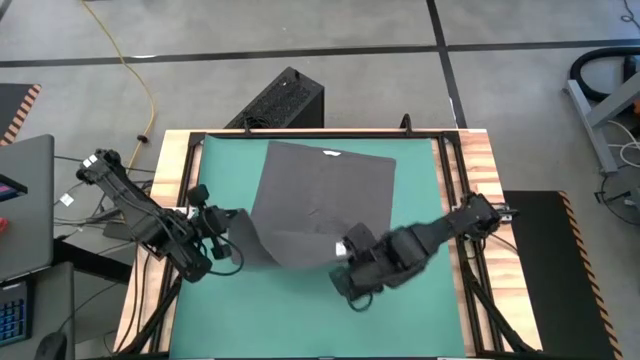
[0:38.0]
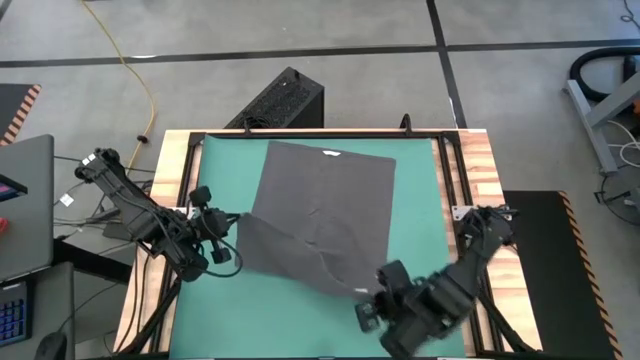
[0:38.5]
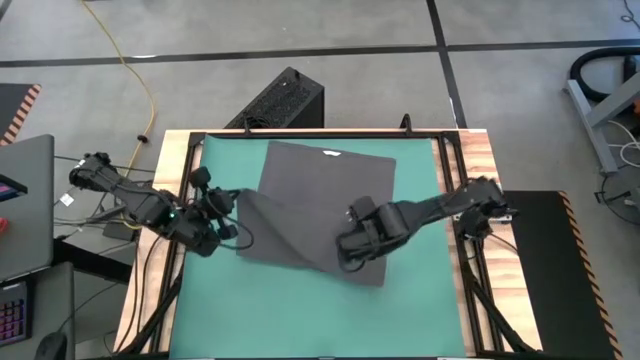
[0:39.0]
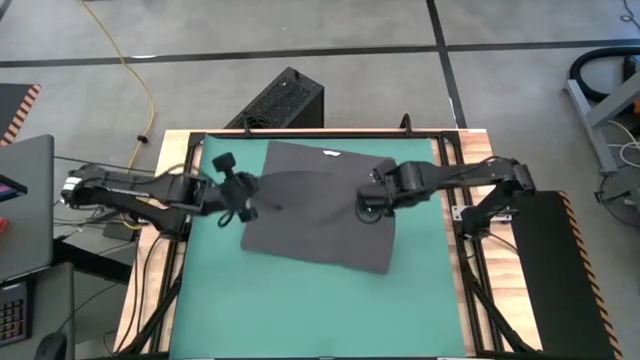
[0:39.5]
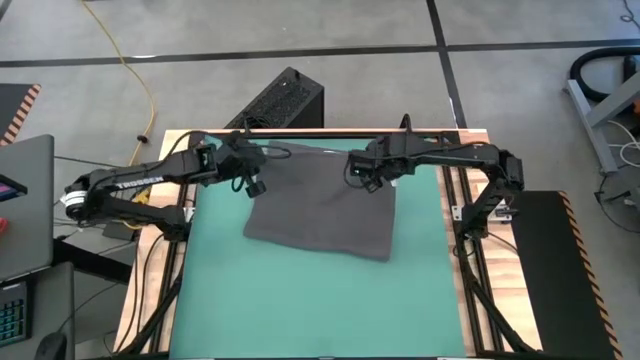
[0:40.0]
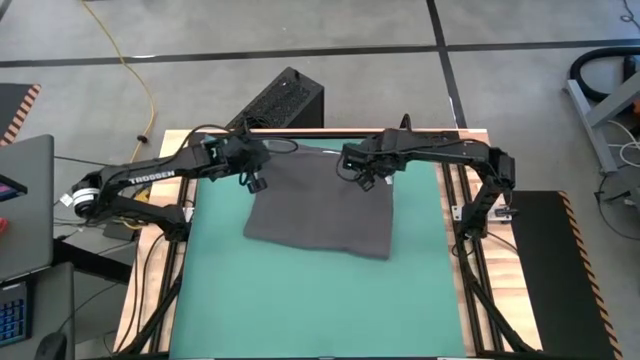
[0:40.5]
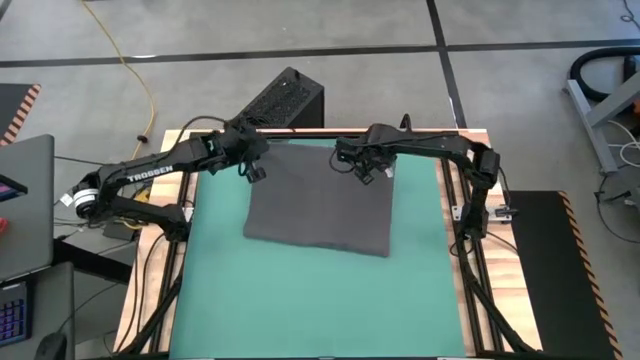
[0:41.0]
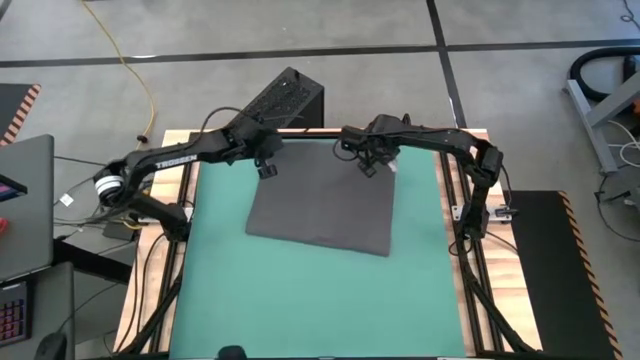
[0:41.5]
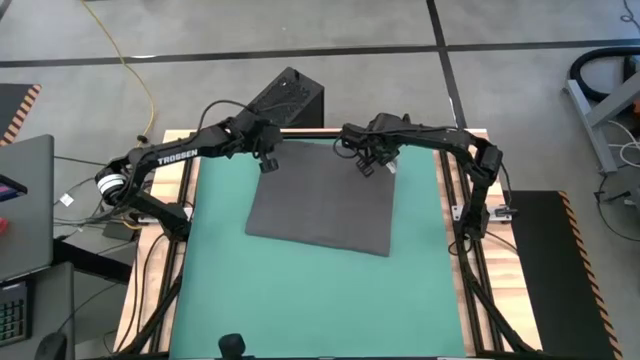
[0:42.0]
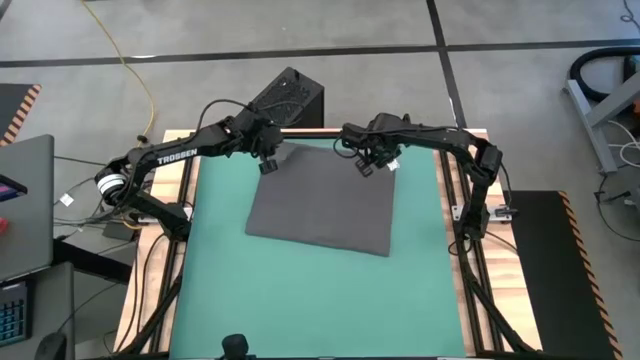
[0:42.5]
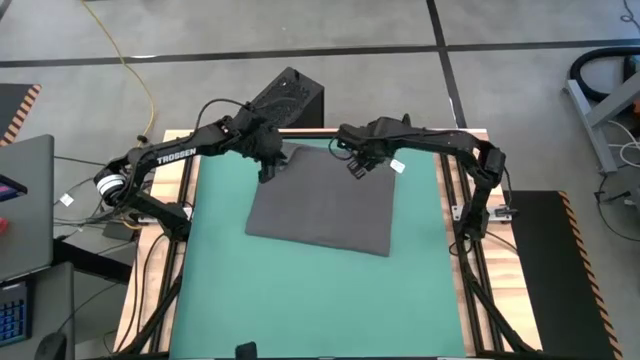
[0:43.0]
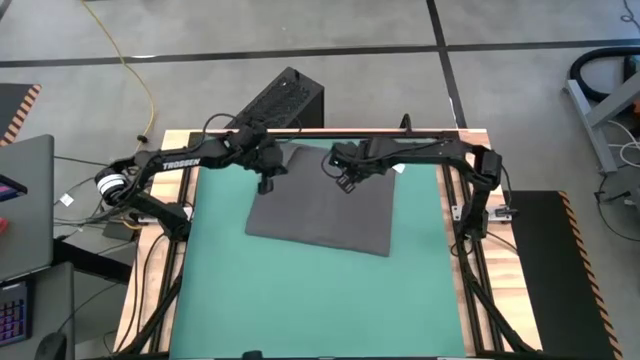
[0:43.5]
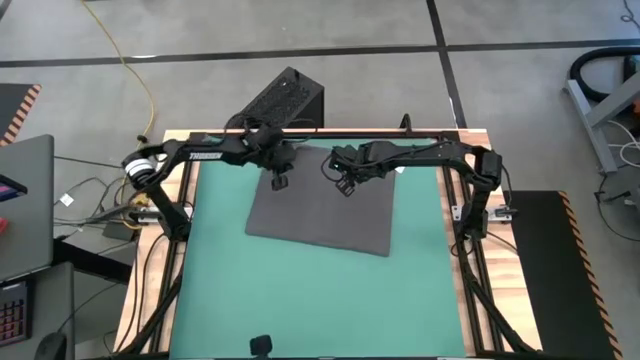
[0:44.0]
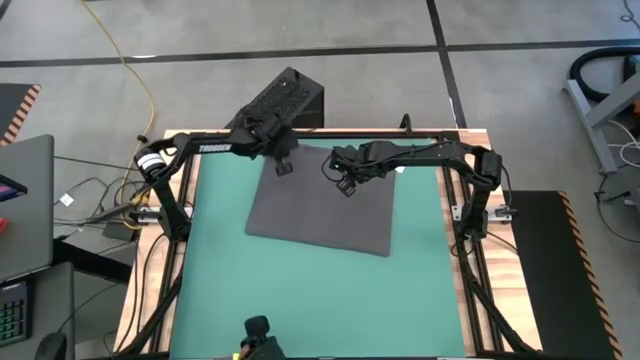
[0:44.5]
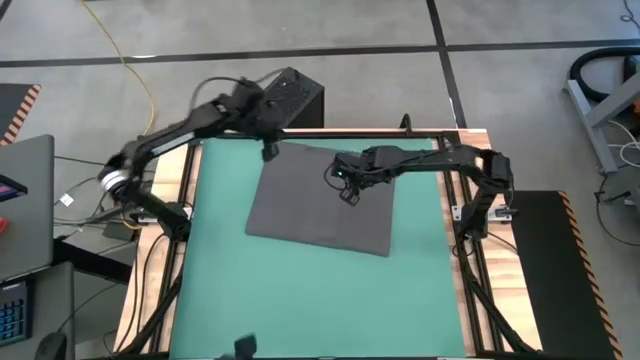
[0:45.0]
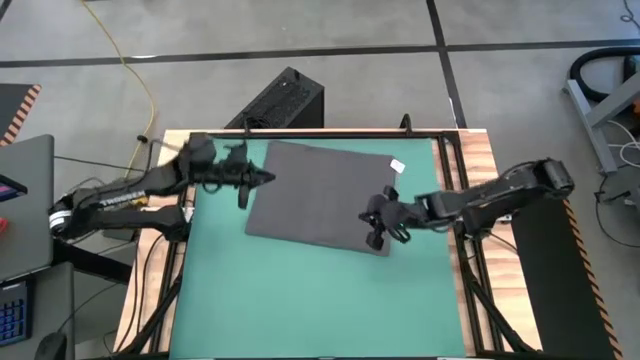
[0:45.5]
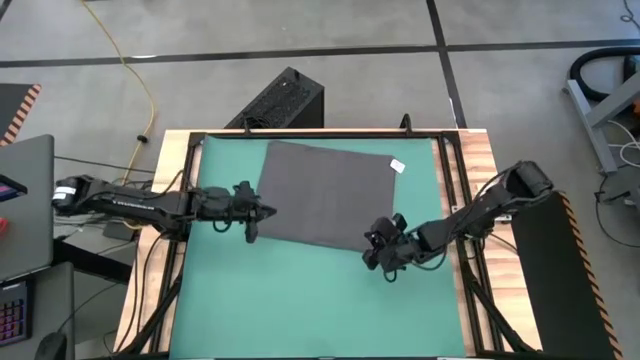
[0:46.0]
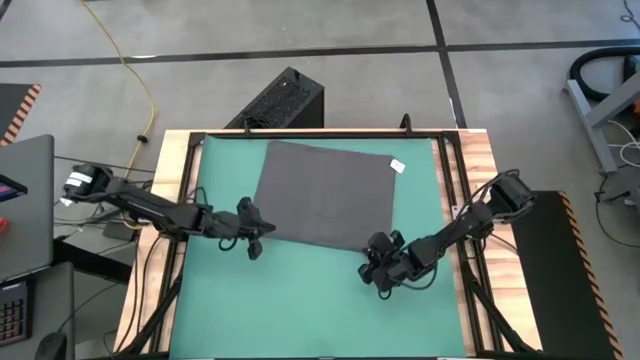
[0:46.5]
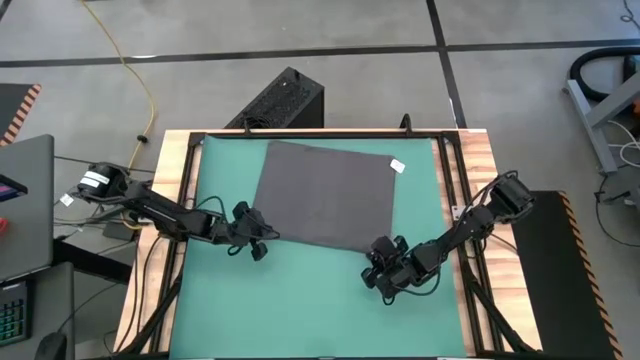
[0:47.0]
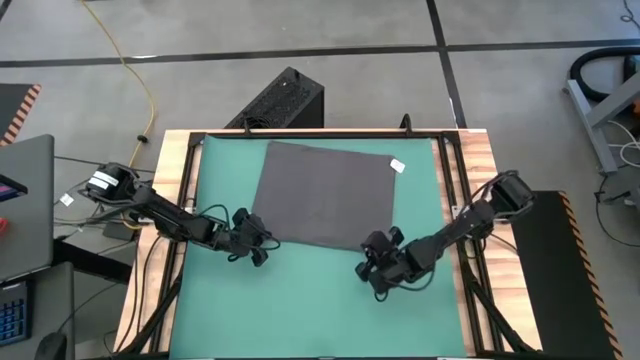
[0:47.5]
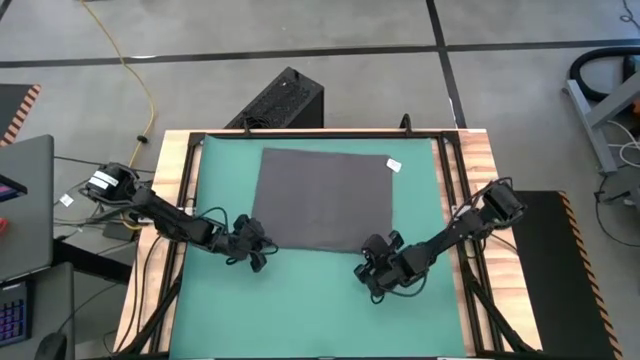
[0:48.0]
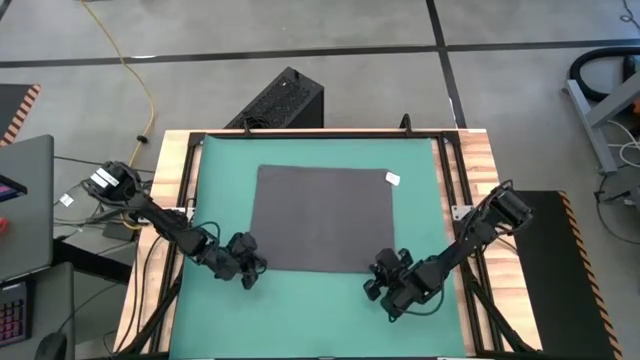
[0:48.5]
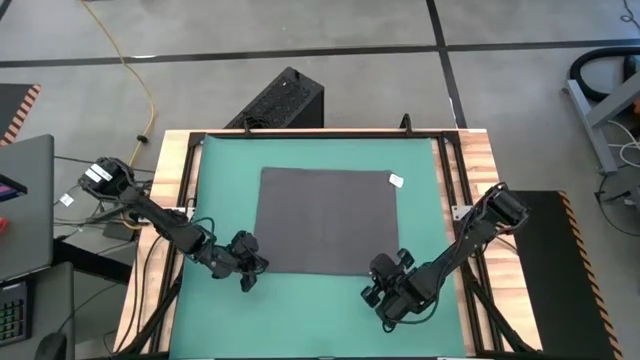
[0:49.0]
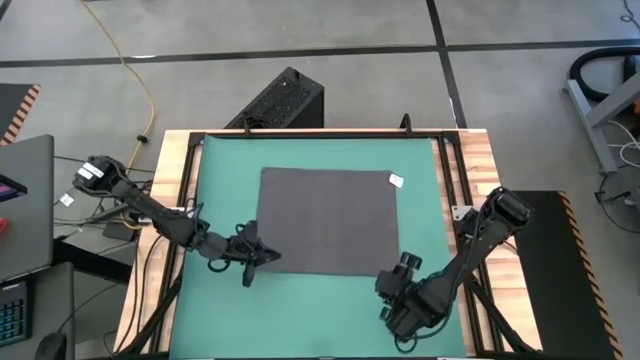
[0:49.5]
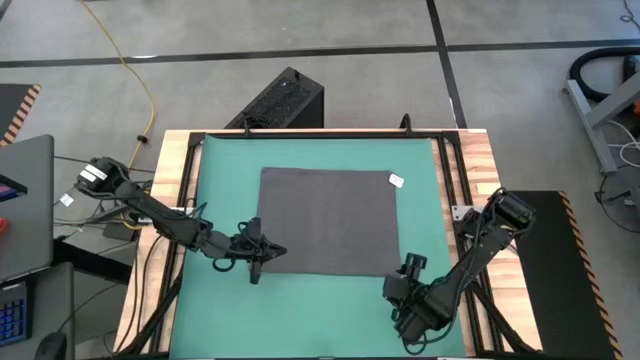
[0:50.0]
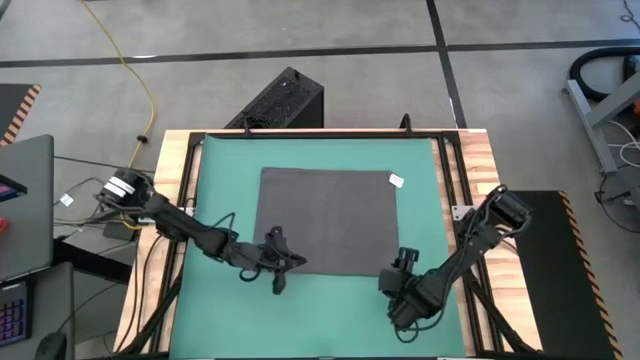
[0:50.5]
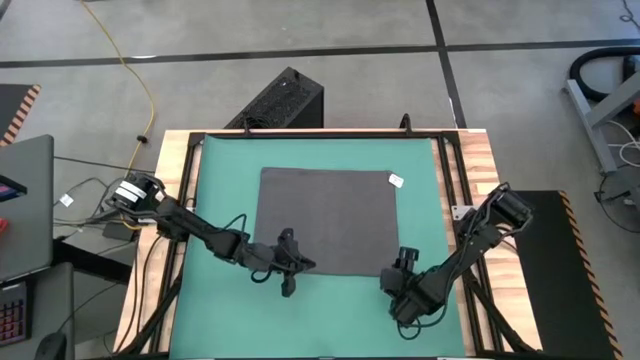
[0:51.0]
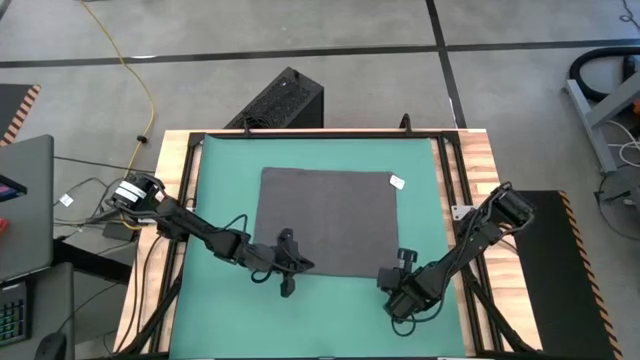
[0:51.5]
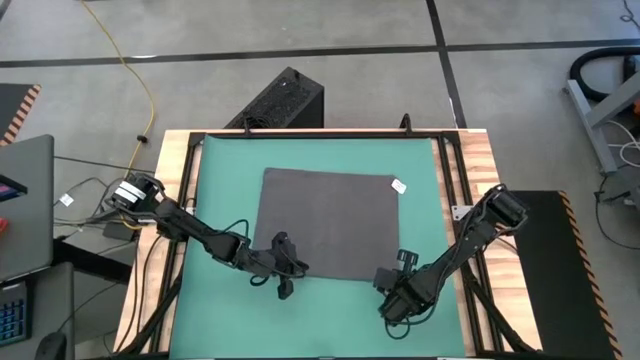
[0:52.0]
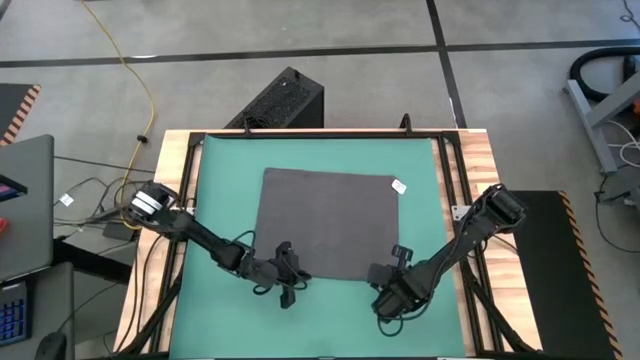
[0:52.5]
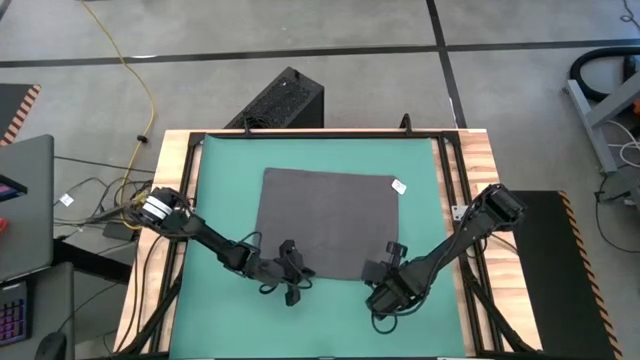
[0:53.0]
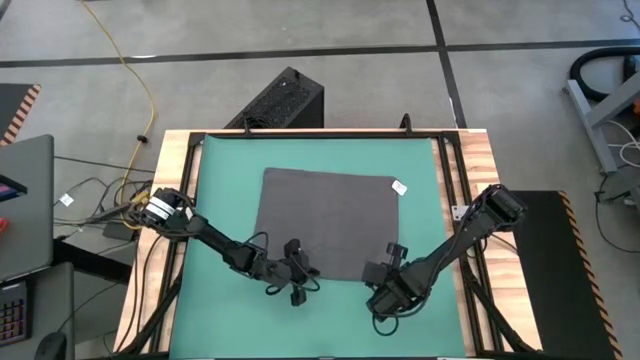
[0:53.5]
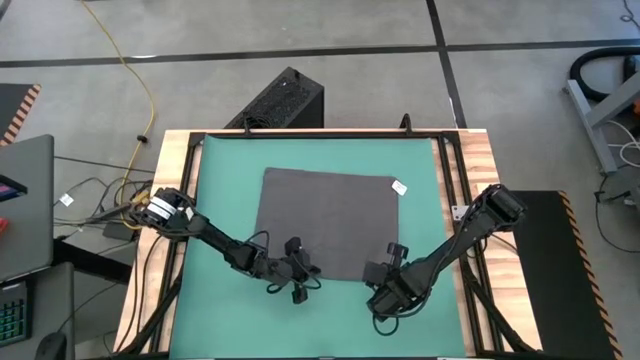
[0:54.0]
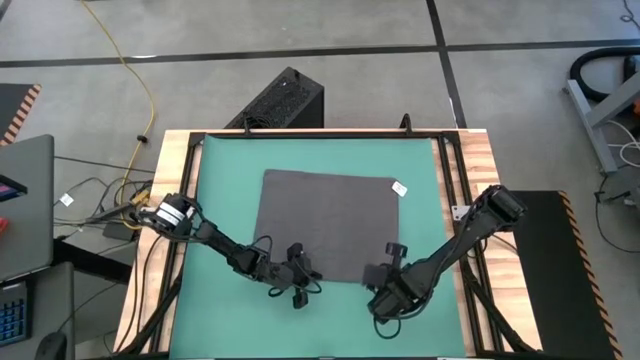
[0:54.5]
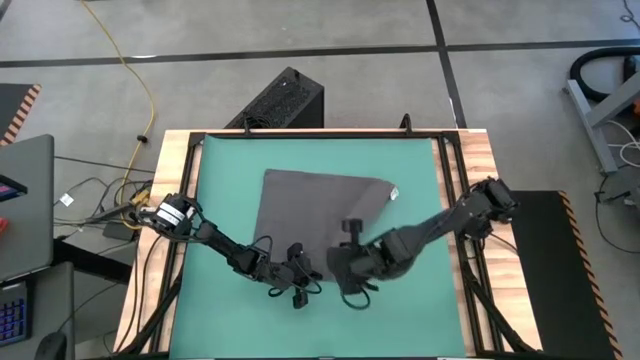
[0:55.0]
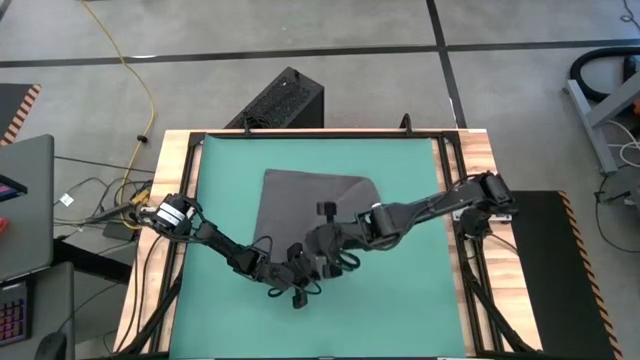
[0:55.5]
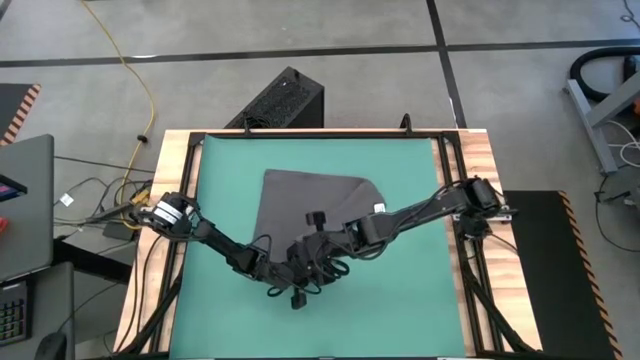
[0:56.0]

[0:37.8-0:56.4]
Task: Roll towel
Fold the gray towel
